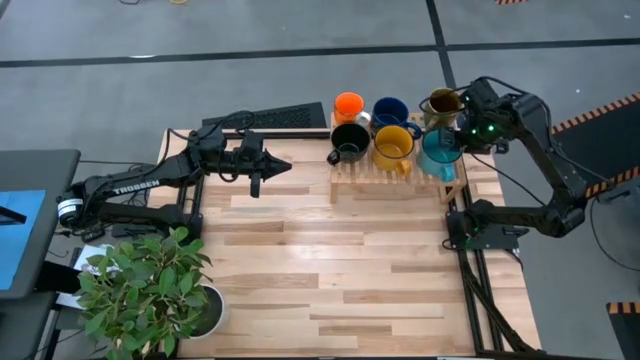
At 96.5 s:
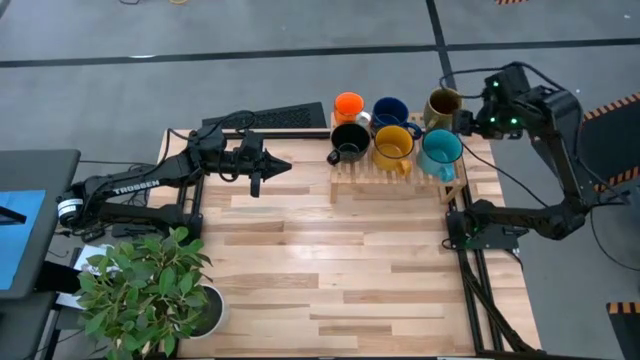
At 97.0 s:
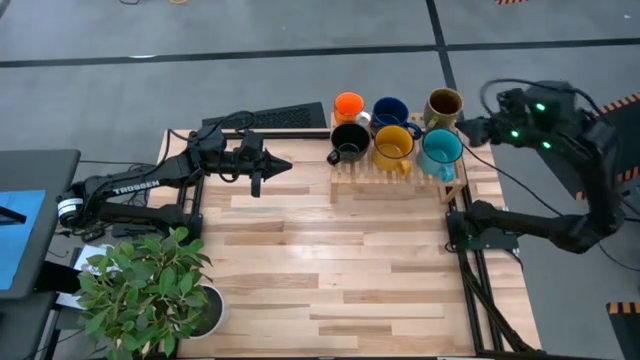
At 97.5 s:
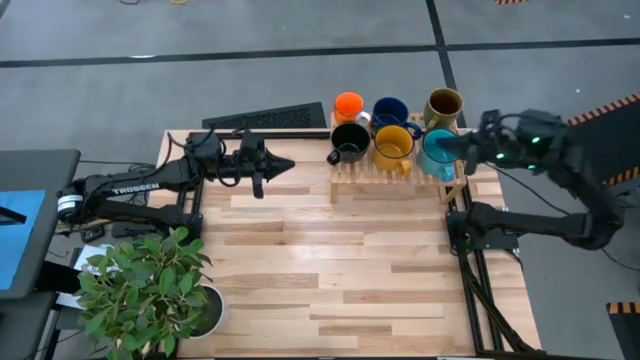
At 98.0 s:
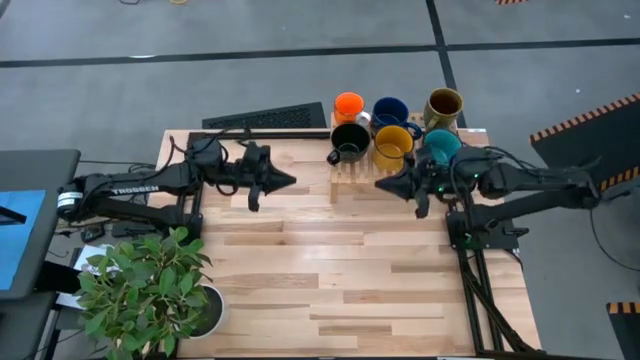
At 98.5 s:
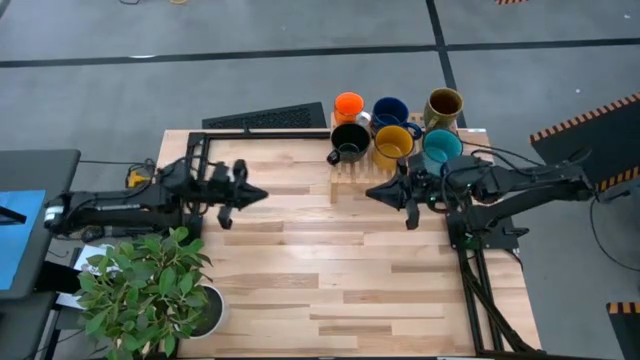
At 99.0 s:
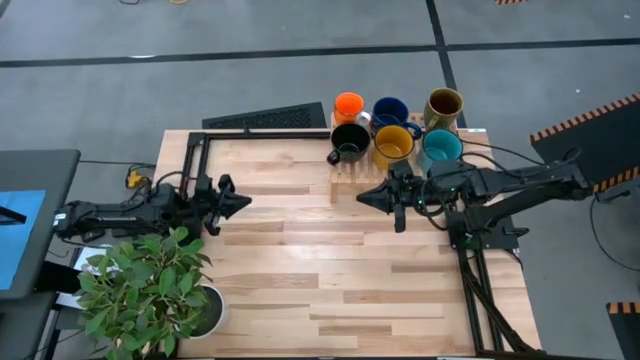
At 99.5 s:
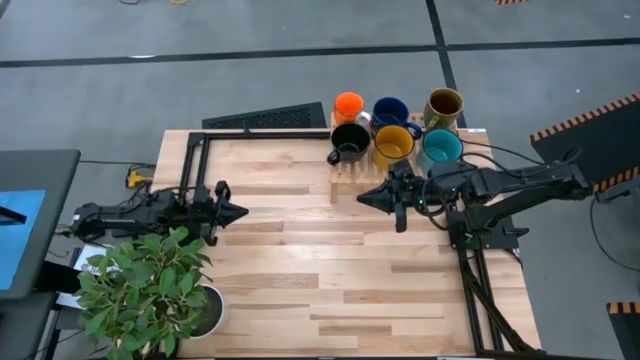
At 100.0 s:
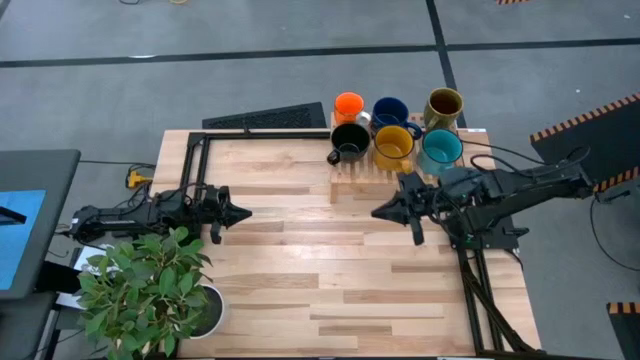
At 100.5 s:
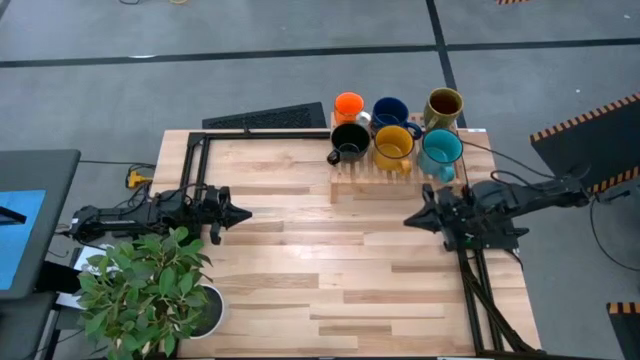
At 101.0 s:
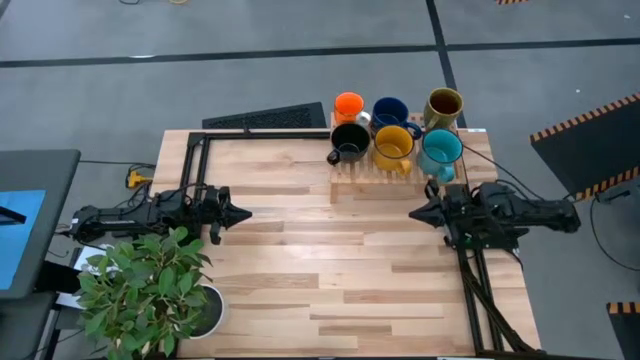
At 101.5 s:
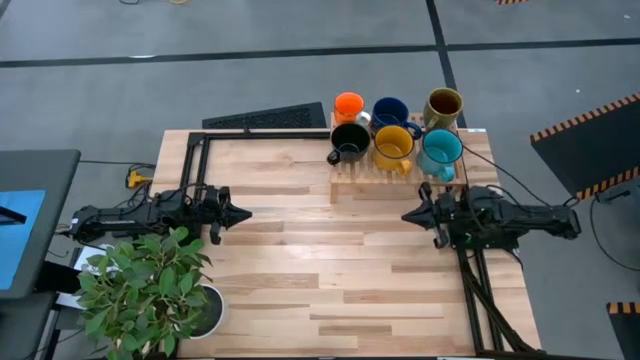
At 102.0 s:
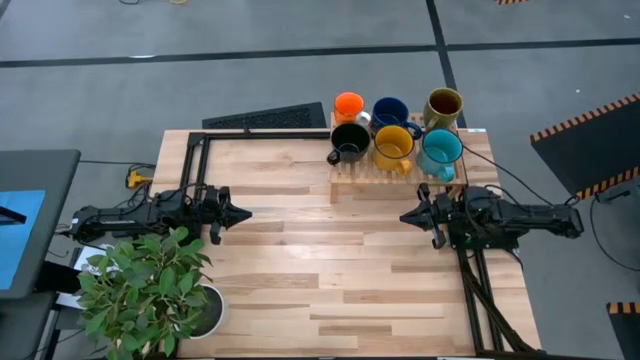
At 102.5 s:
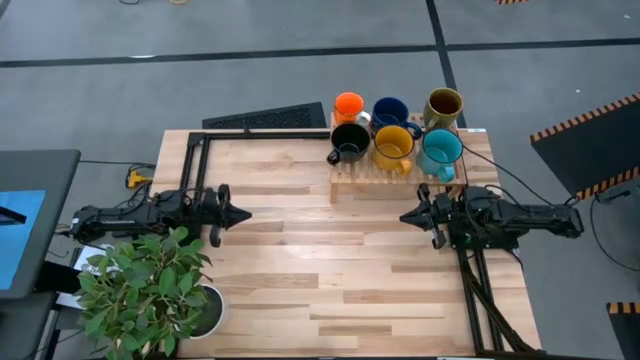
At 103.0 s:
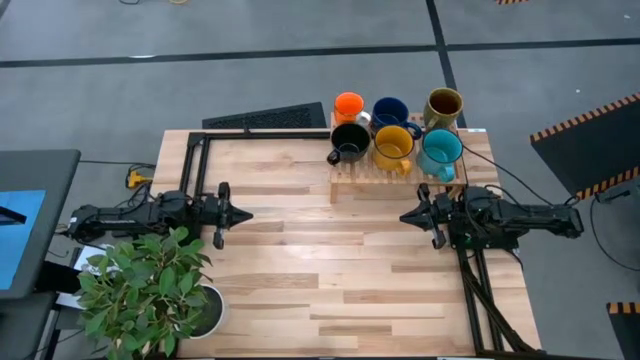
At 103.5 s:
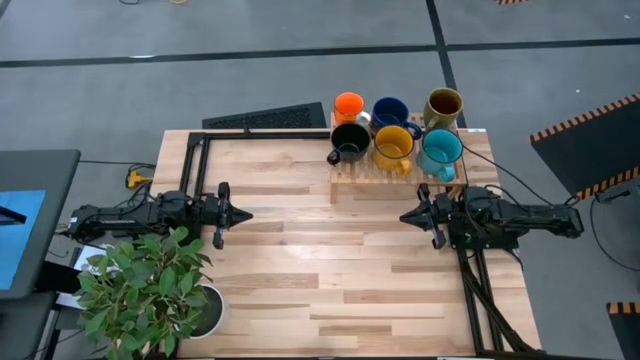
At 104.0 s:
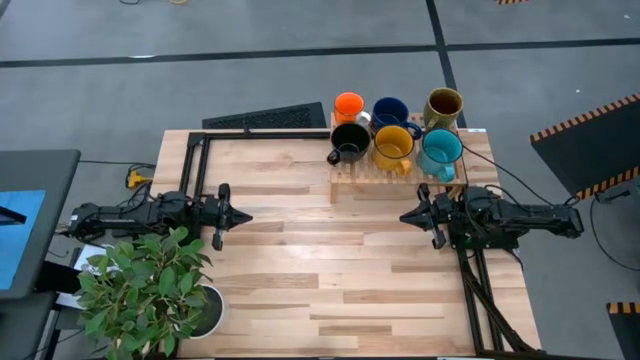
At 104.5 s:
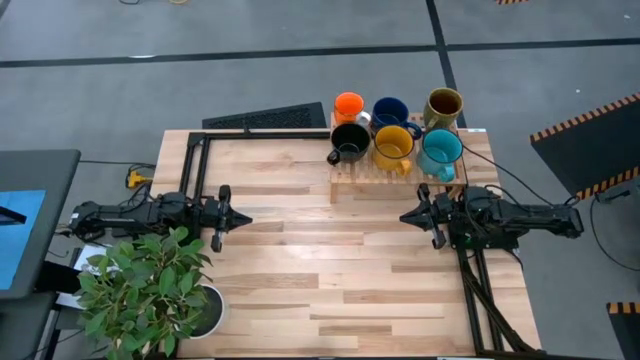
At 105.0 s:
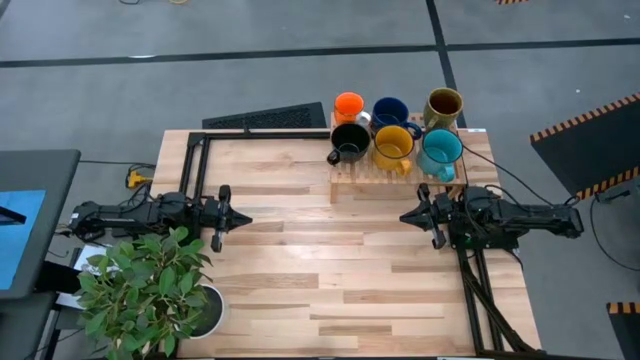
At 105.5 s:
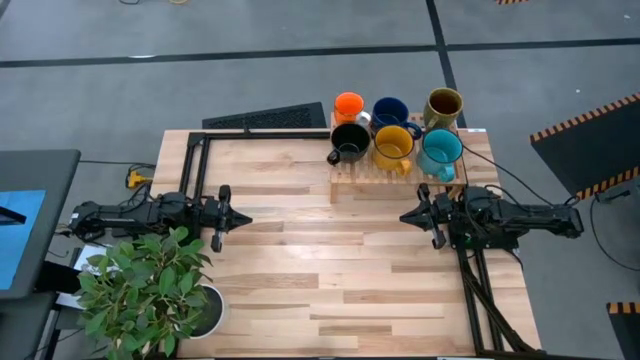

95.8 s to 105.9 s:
Task: Place coffee mugs
Return to Home Position

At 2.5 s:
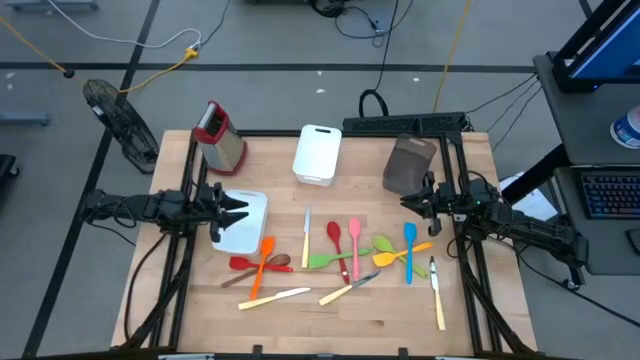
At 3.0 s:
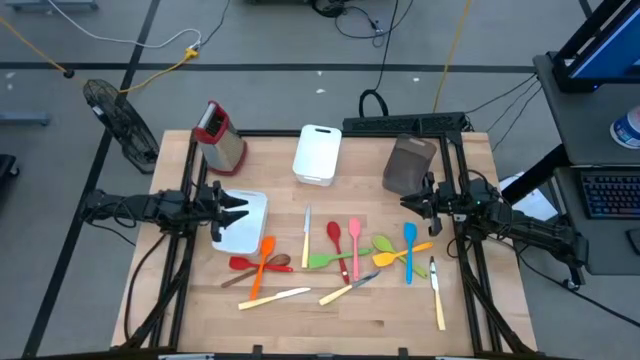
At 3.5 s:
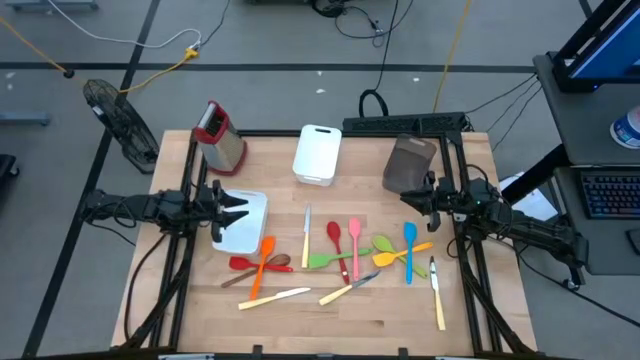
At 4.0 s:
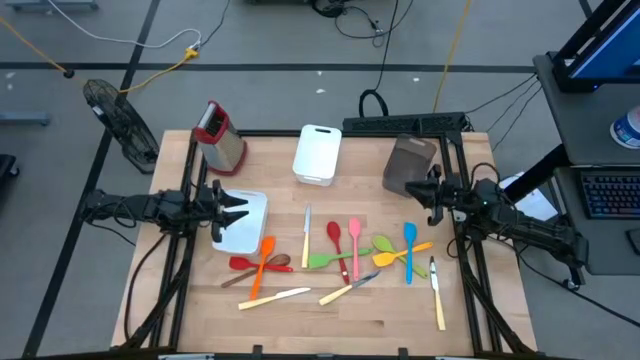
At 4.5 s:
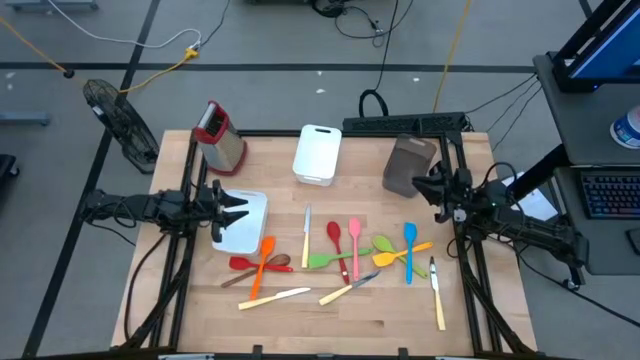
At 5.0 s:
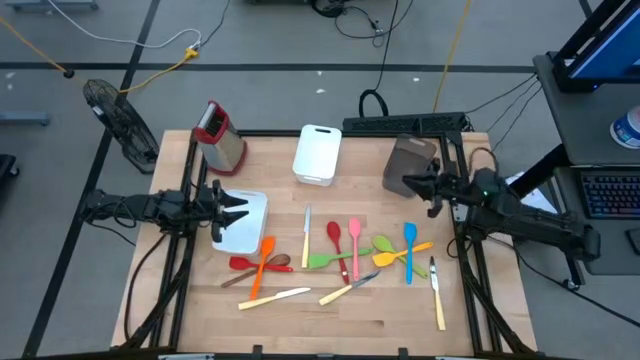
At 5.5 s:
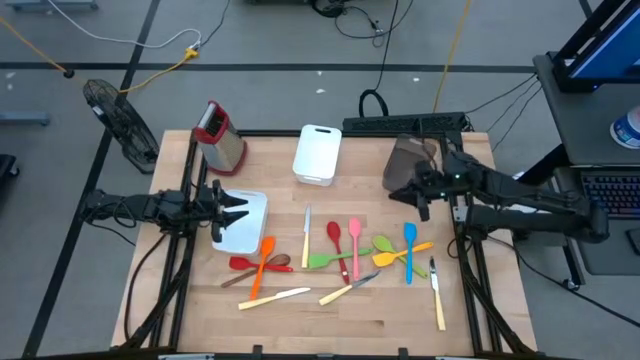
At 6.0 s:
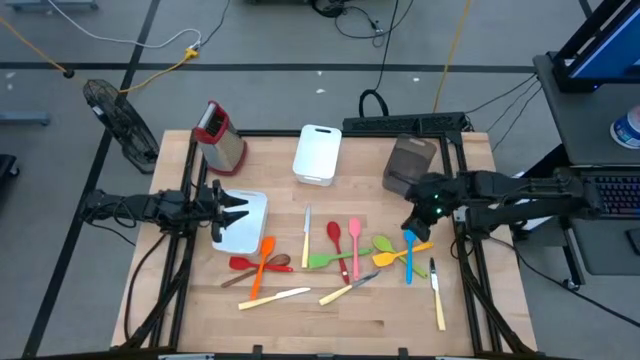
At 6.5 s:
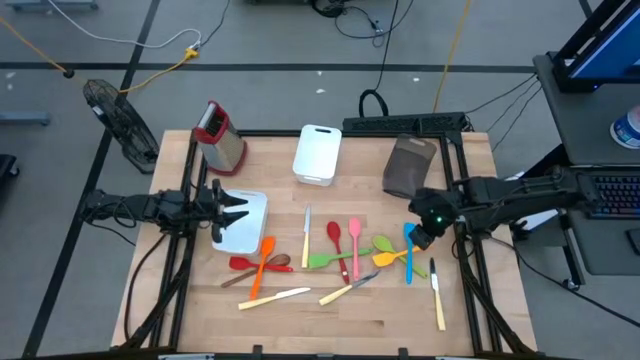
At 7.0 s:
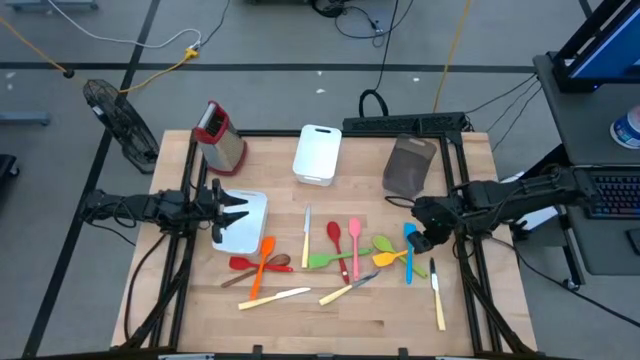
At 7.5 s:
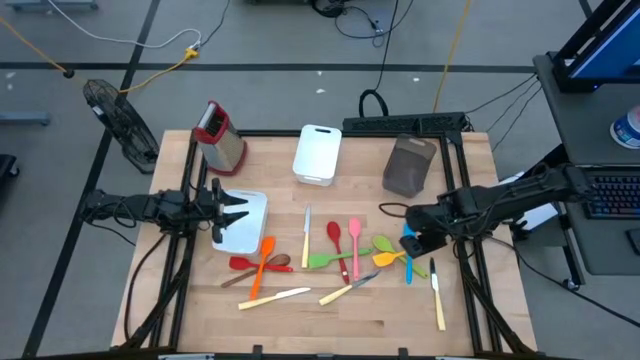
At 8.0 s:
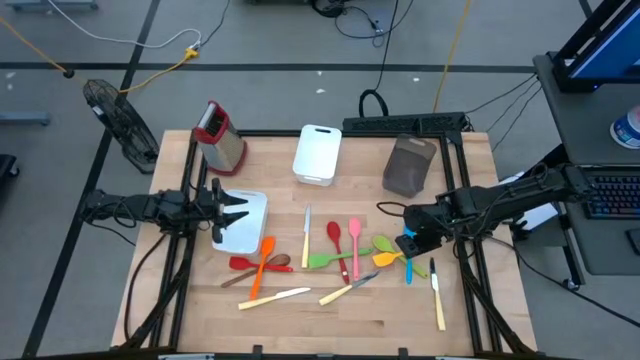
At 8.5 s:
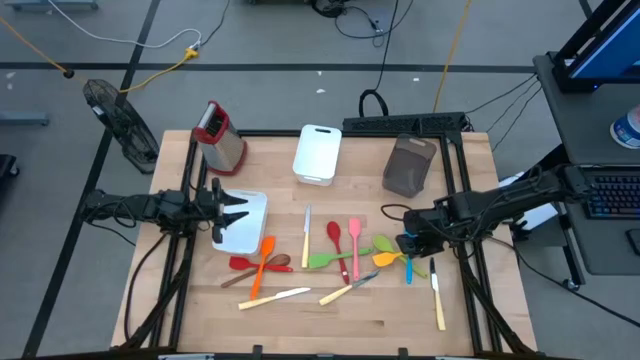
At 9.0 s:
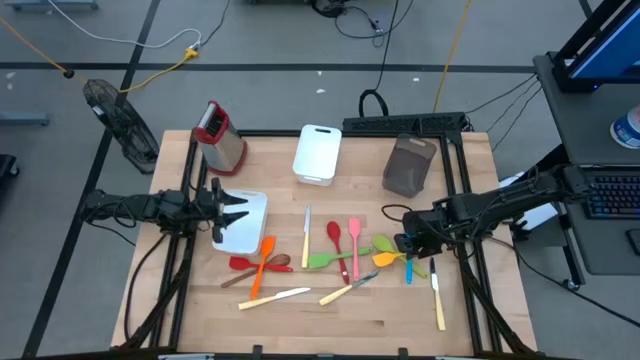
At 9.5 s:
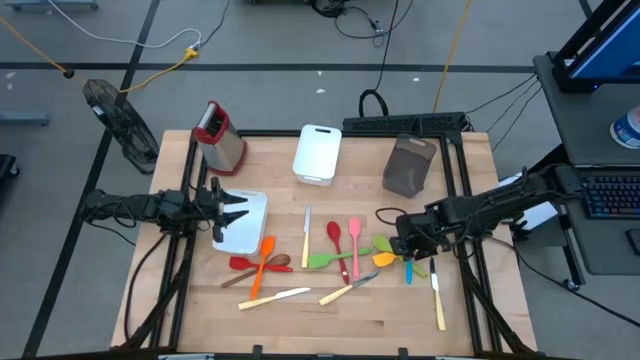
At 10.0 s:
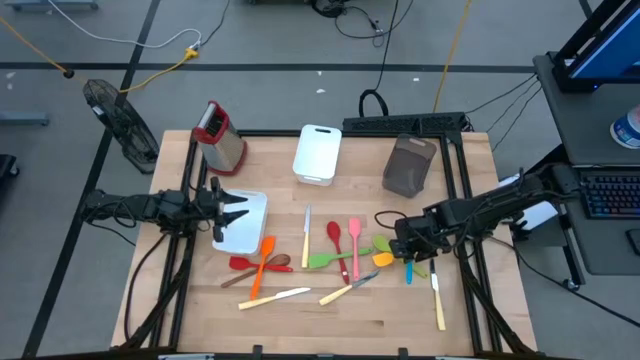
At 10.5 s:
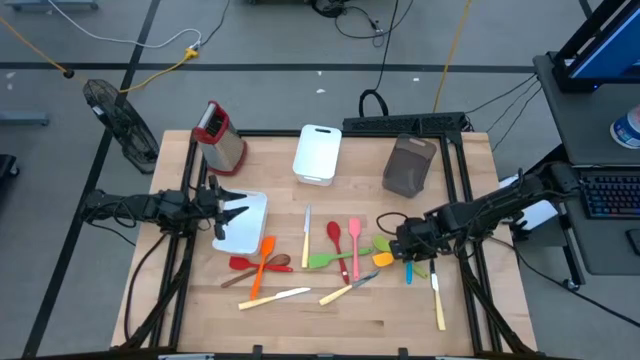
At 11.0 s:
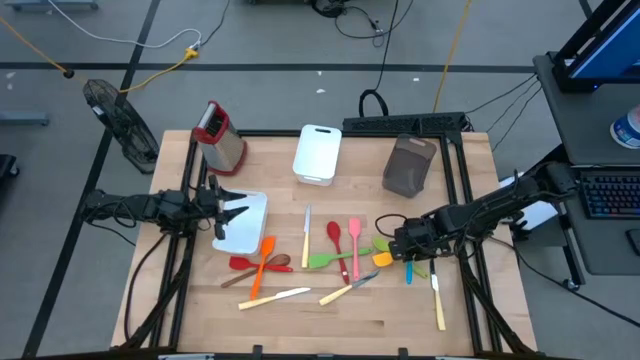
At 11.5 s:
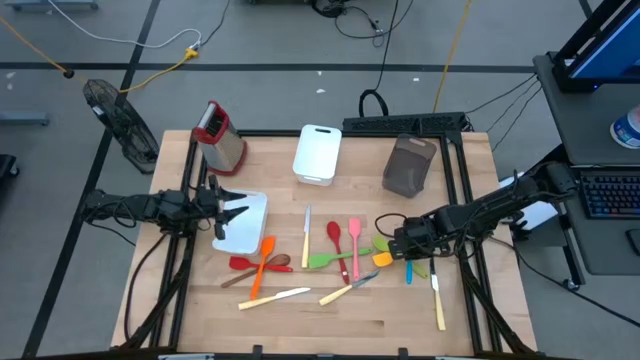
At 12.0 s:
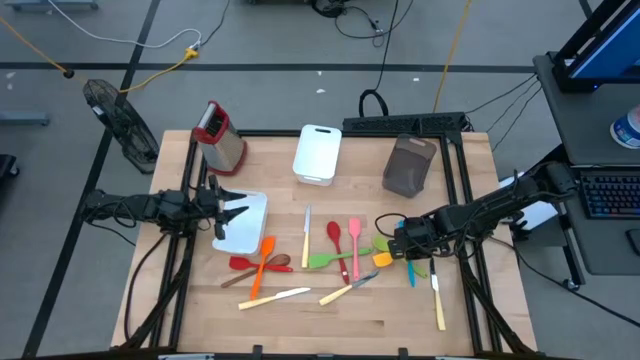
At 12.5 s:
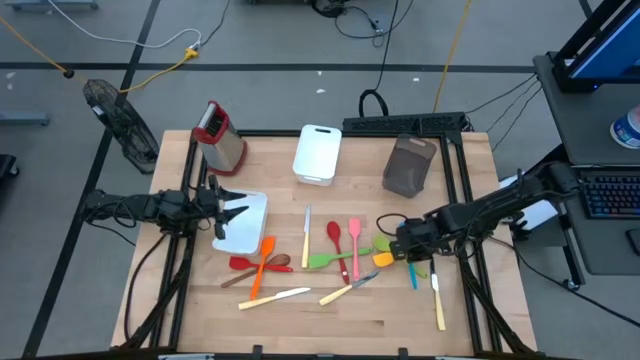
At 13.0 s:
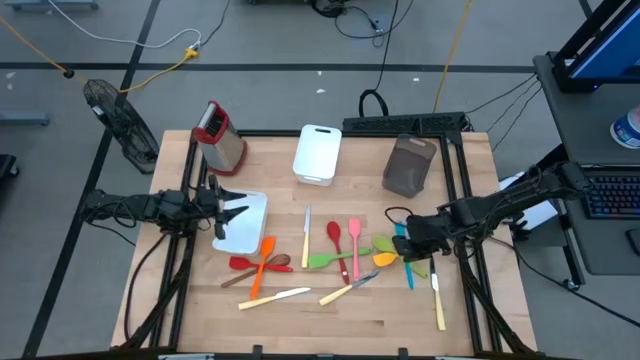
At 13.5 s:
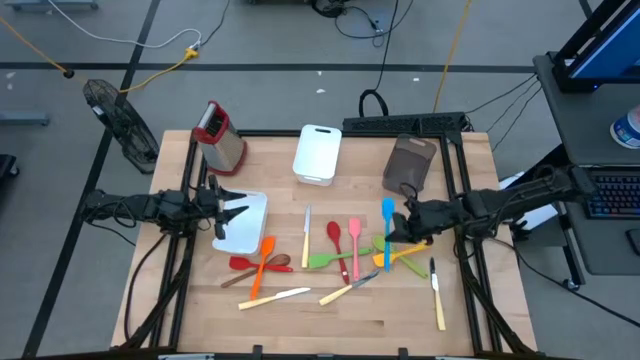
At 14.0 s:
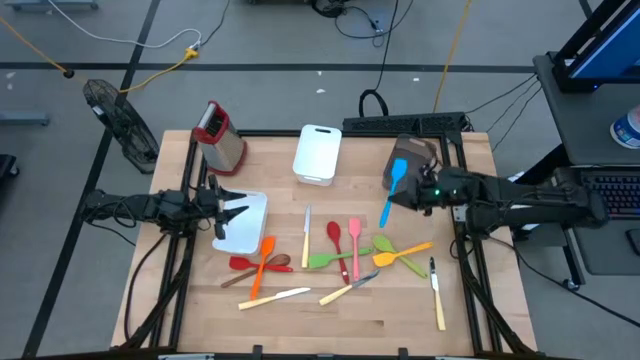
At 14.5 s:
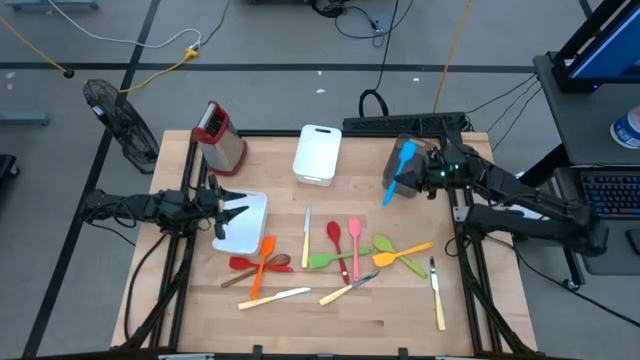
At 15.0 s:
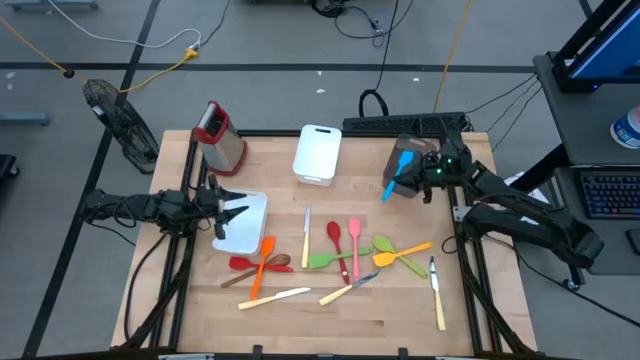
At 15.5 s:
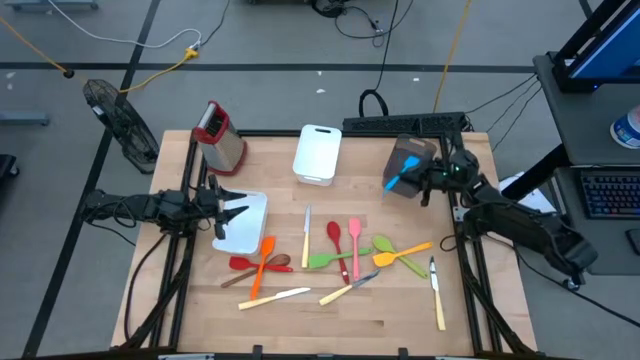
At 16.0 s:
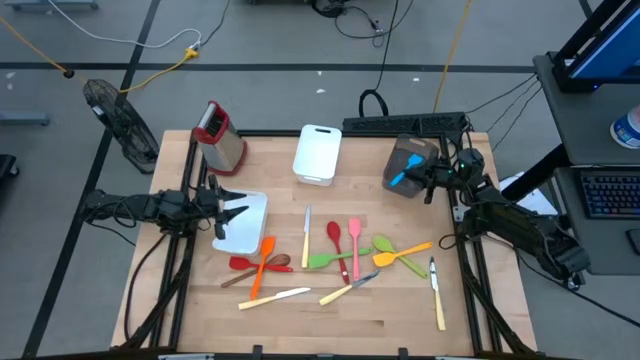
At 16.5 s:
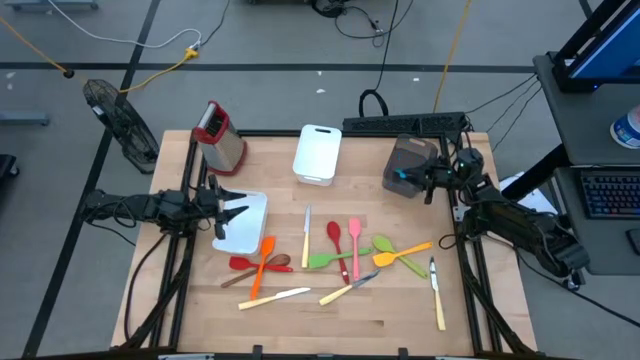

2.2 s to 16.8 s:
Task: Pick & Place Kitchen Items
Put the blue spatula into the black bin
